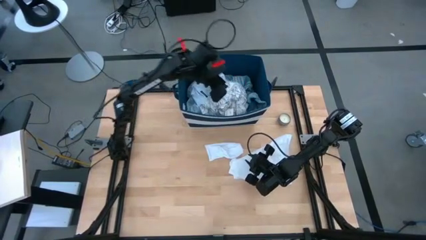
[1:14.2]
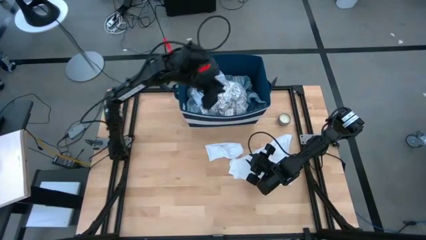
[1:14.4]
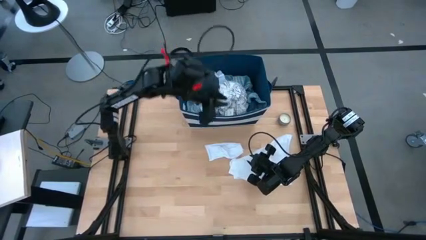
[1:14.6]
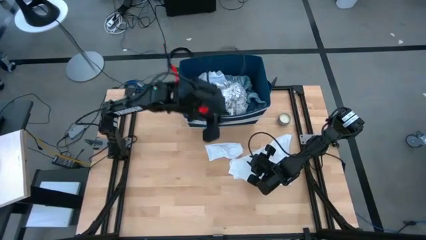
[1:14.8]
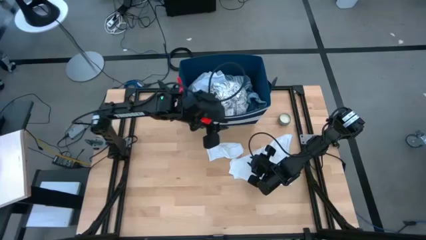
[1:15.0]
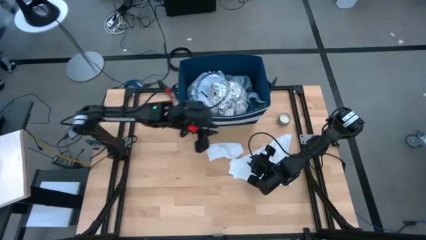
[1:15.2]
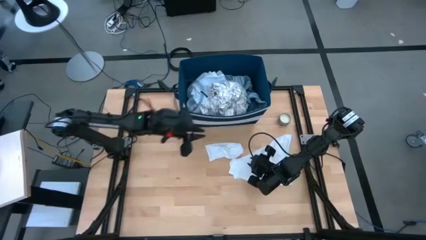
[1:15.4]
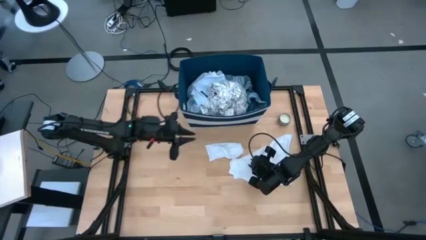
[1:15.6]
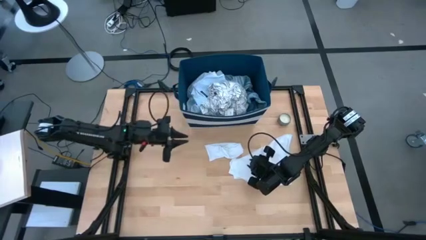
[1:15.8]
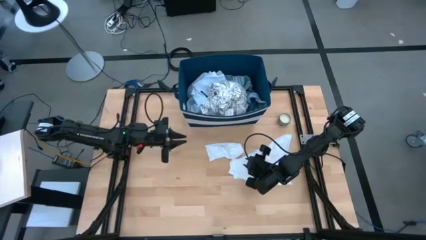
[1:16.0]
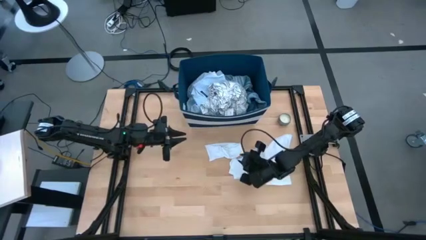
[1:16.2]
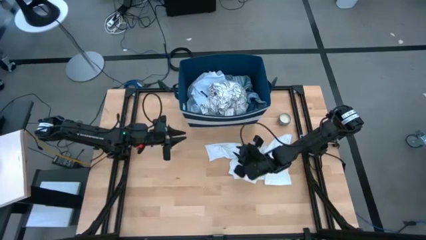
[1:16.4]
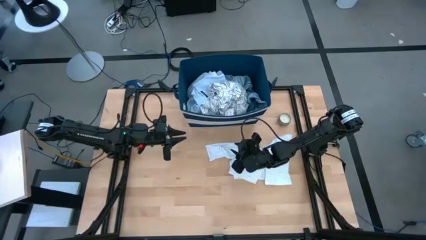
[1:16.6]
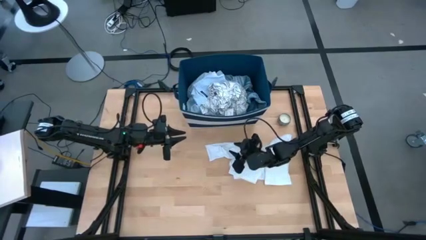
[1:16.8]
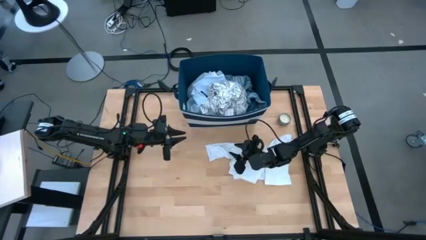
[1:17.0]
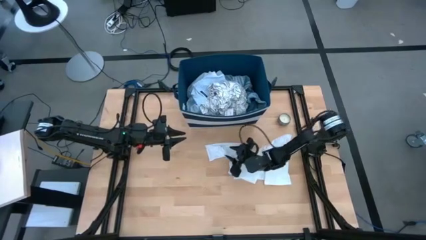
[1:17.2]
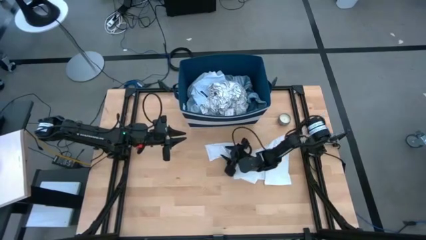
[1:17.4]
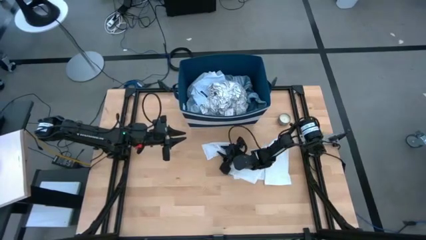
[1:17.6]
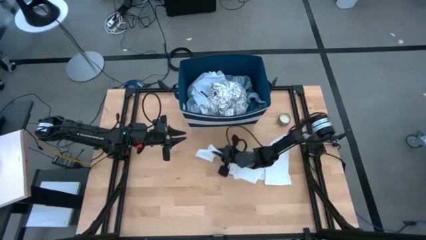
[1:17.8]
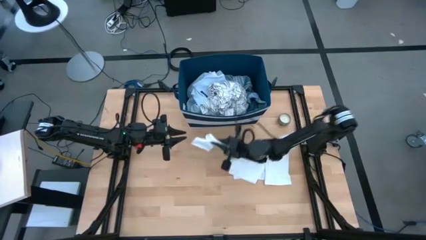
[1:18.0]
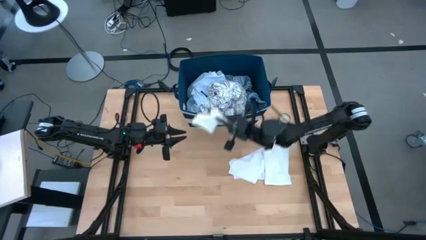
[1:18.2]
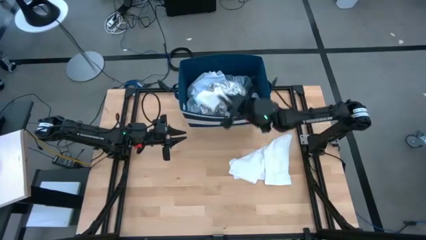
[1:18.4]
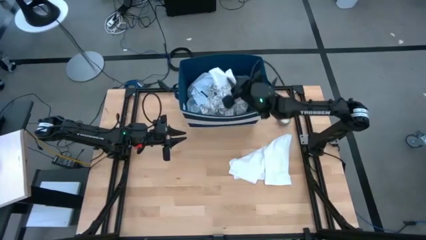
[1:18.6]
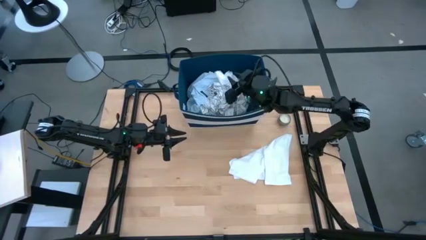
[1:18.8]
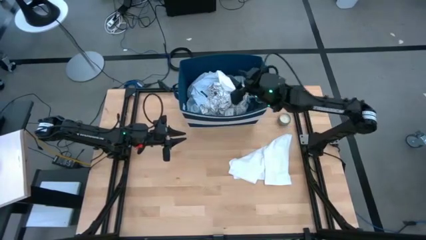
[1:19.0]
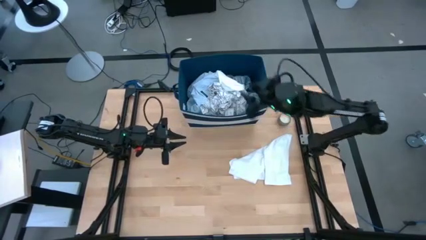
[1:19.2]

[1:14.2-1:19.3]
Task: Sort clothes
Put the white sock into the blue bin

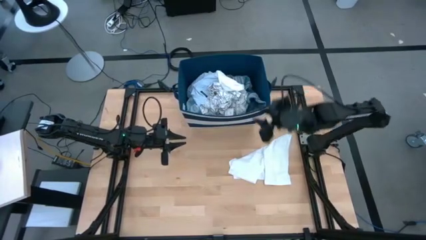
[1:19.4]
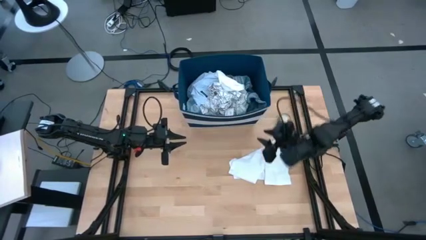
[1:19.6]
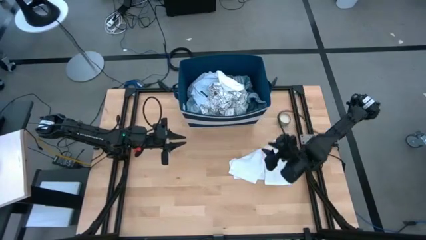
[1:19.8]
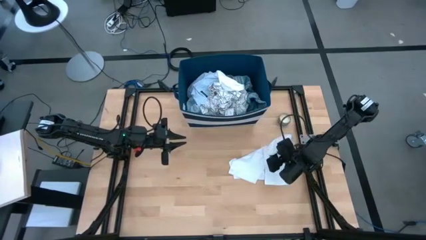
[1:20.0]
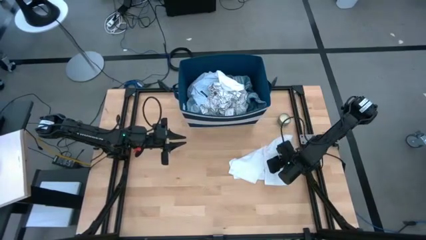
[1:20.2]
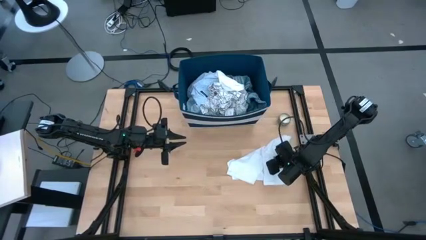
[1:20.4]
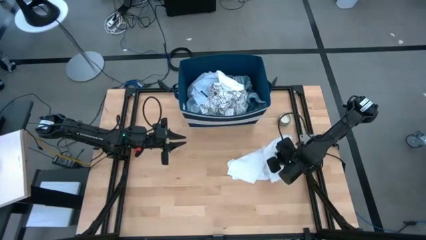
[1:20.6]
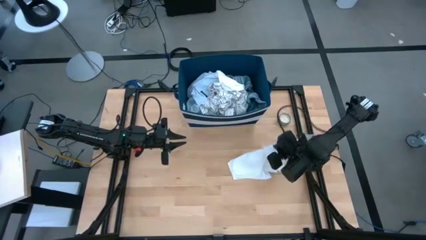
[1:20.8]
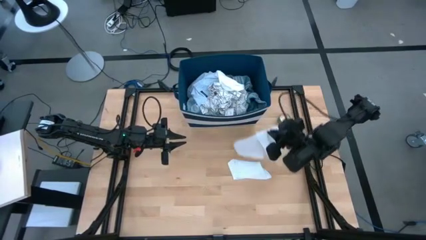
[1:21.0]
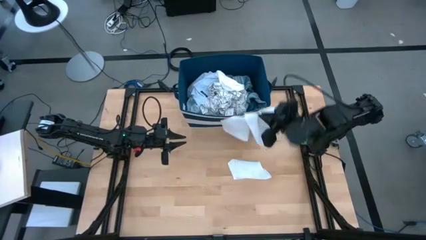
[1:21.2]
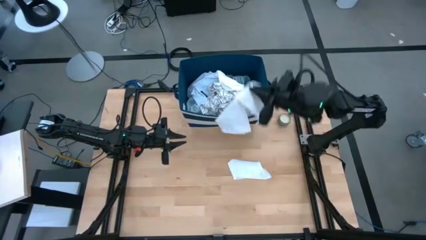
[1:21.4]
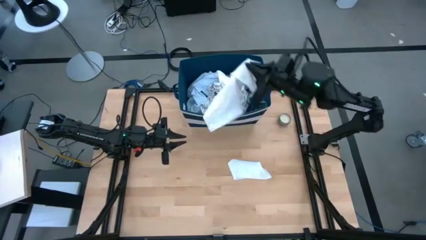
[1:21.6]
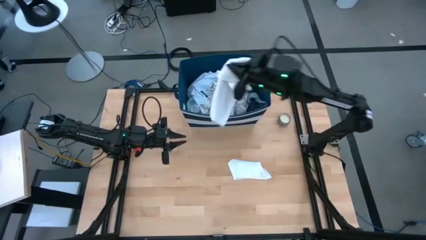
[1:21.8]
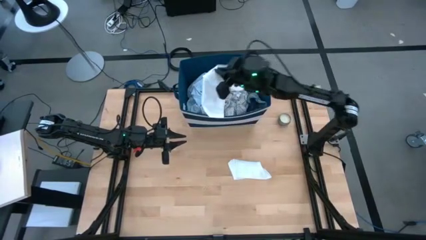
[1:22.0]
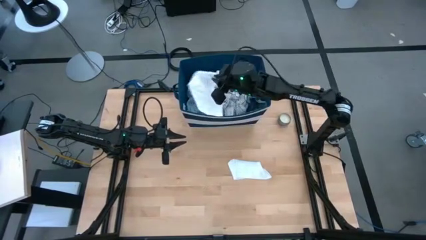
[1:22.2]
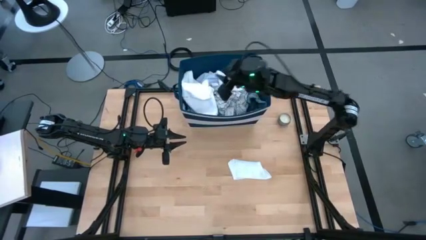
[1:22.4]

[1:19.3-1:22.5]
Put the white underwear into the blue bin

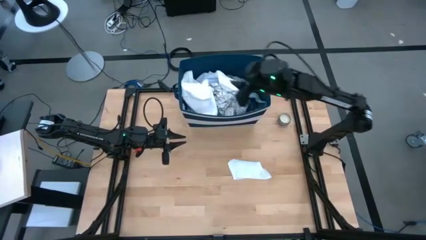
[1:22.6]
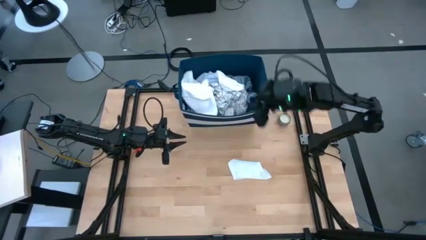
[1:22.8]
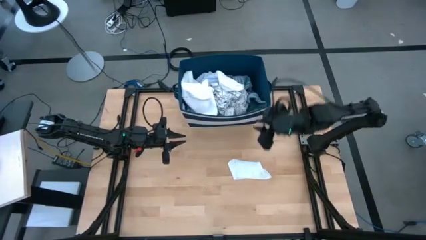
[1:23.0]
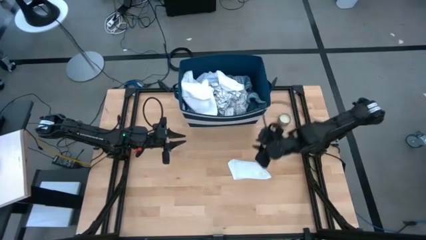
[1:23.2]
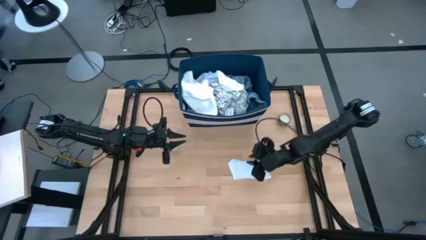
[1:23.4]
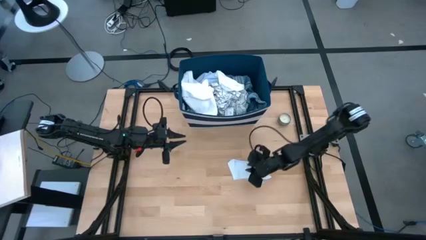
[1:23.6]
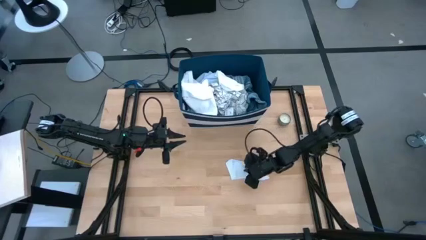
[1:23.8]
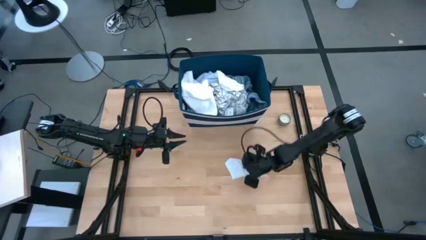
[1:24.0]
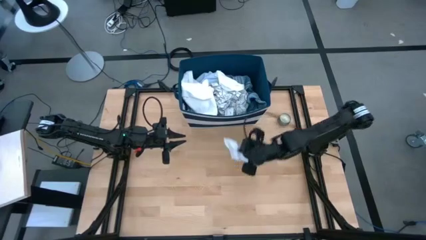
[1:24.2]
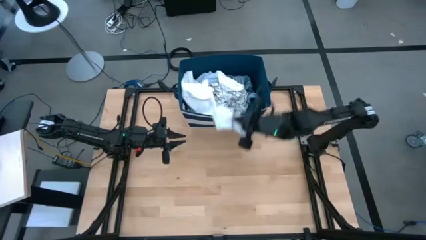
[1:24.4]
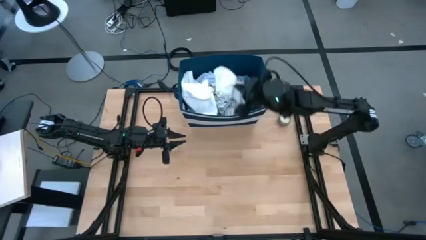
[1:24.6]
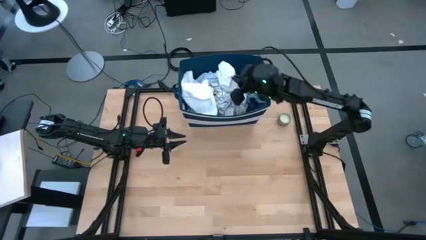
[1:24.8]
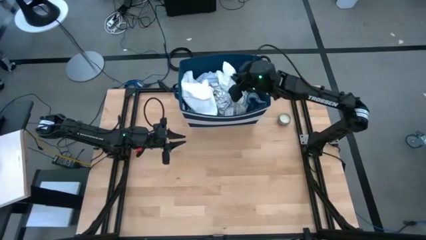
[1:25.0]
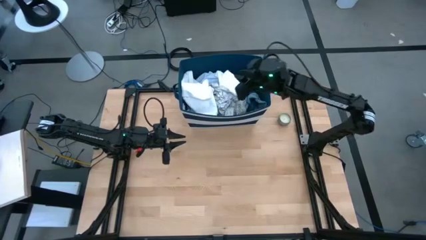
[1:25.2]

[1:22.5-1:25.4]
Put the white sock into the blue bin

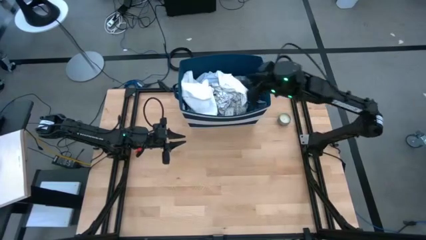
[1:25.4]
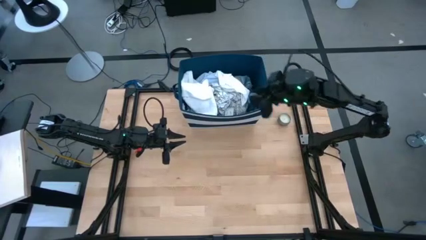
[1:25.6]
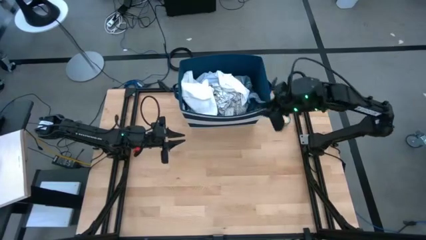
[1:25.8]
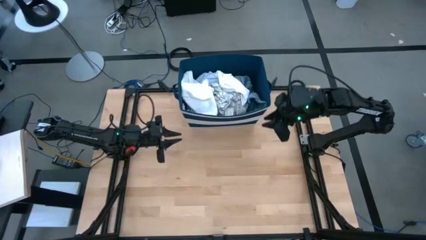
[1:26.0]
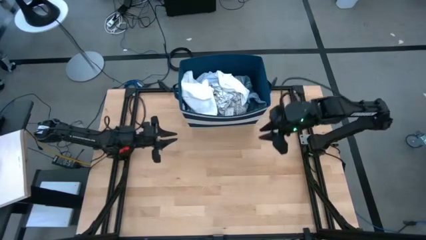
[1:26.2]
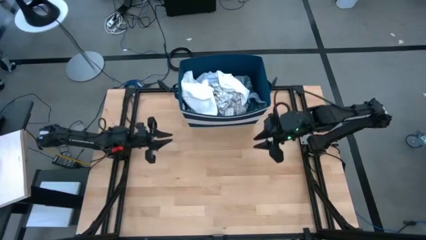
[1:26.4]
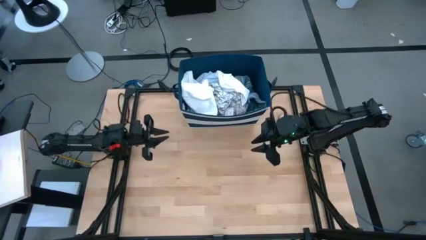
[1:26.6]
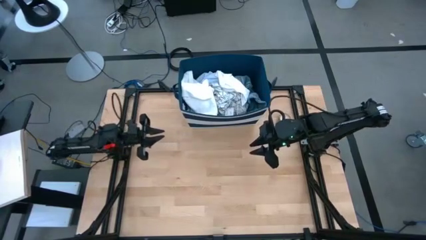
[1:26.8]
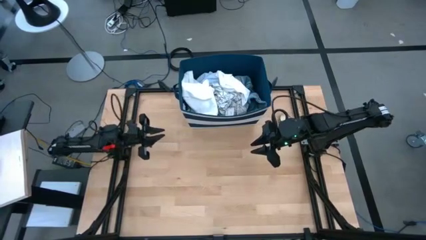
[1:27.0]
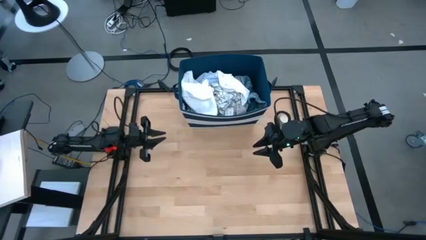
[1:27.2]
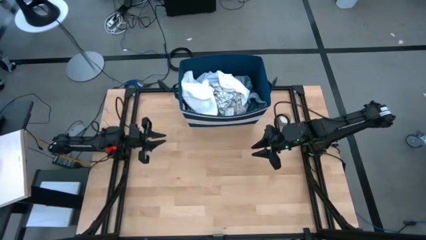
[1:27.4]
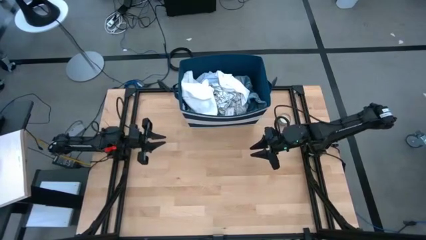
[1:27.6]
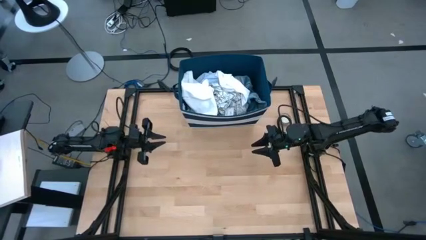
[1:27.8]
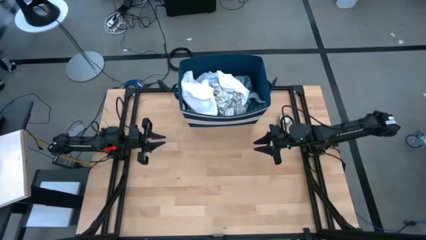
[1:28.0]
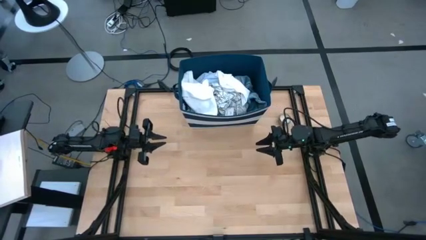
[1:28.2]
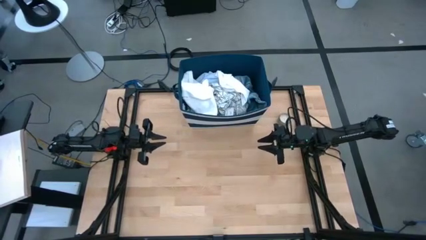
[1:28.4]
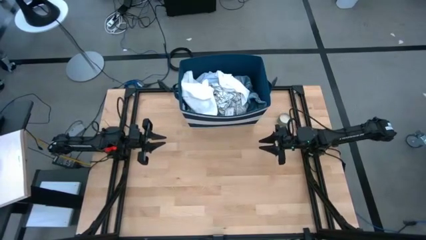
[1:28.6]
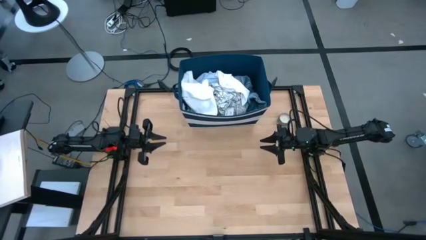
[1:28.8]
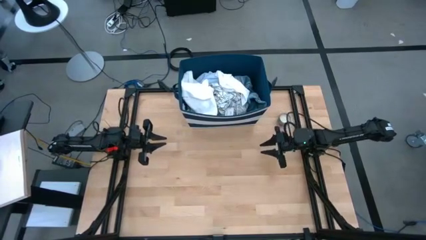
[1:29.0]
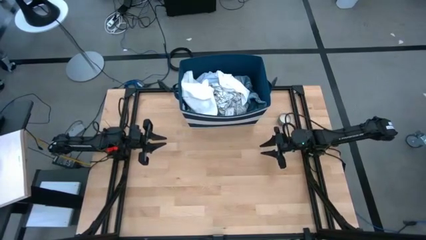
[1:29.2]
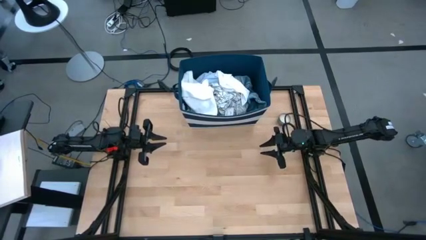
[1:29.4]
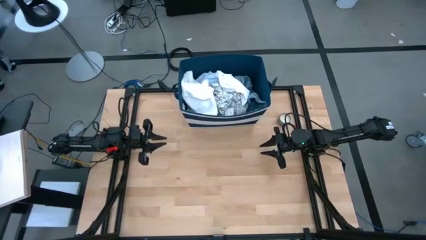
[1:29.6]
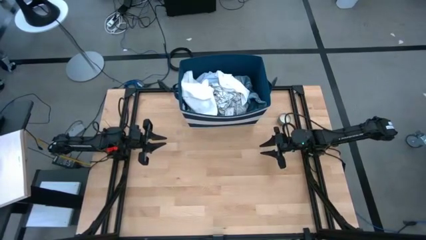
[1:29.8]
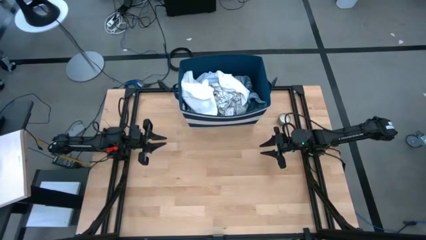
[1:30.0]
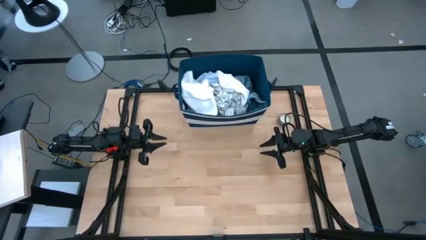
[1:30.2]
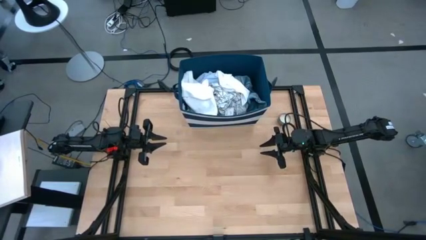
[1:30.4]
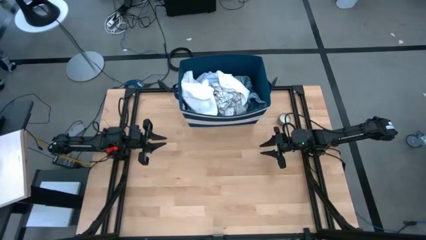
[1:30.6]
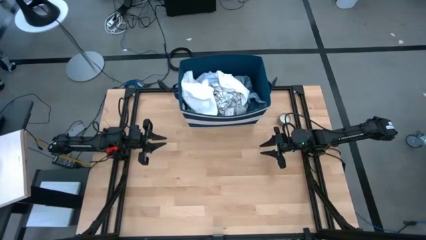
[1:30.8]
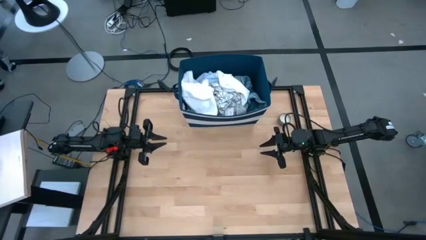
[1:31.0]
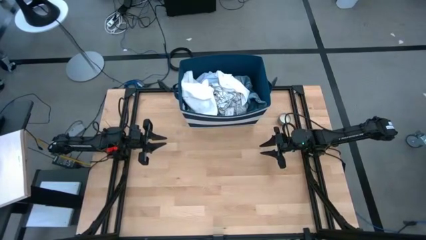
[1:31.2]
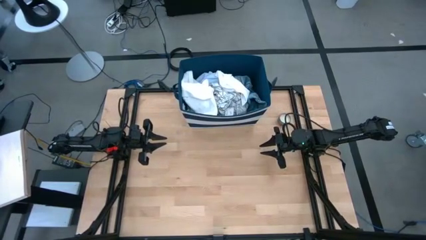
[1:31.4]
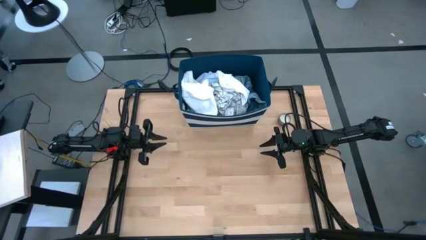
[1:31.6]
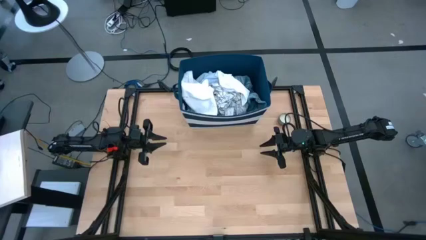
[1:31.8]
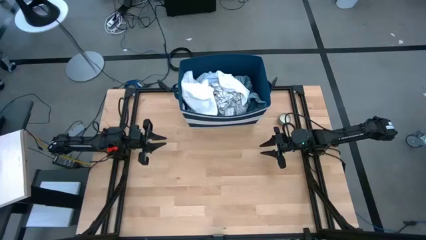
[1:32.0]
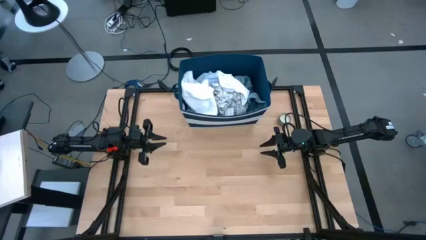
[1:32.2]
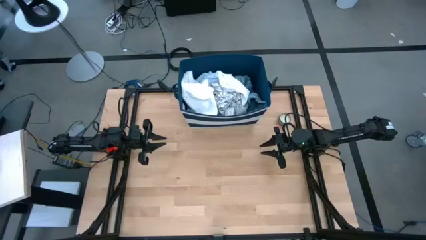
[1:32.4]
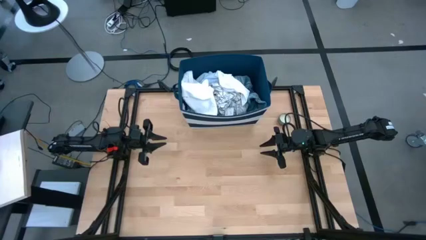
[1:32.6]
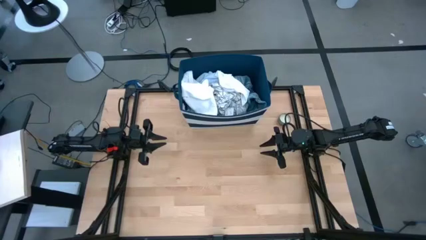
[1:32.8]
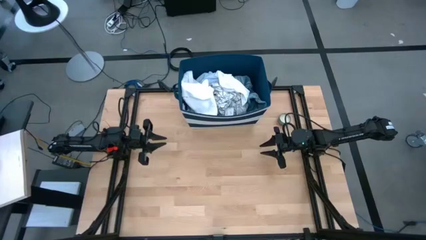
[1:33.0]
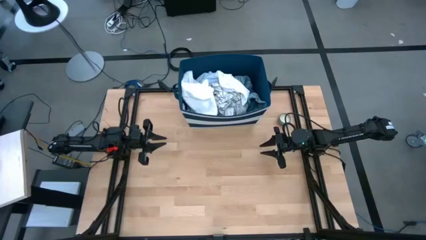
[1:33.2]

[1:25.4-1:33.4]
Return to Home Position
